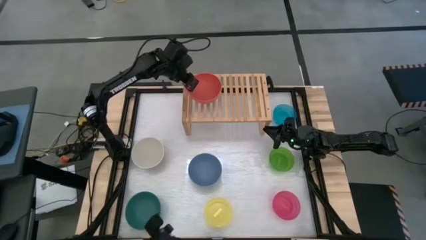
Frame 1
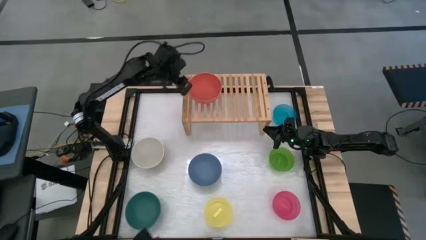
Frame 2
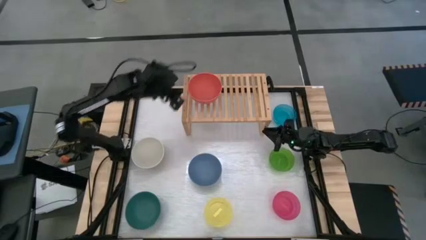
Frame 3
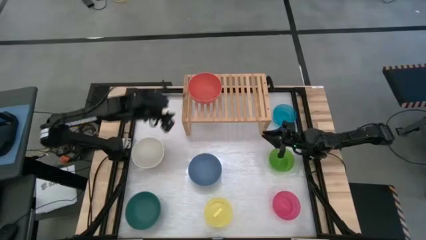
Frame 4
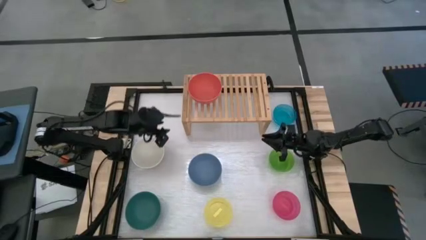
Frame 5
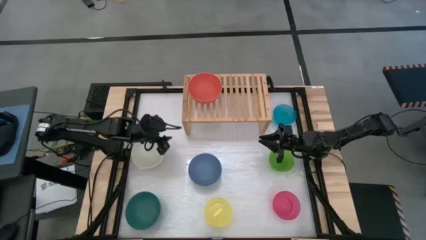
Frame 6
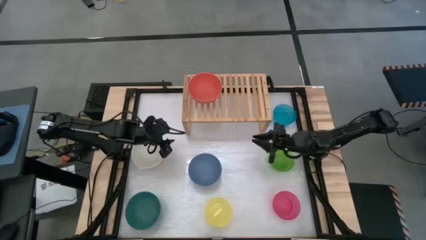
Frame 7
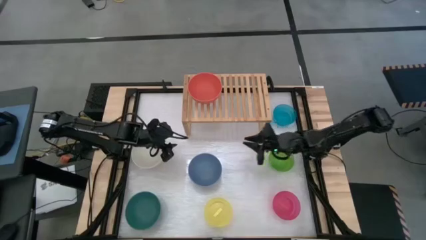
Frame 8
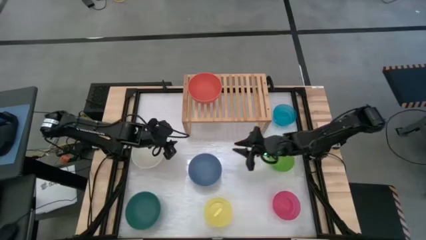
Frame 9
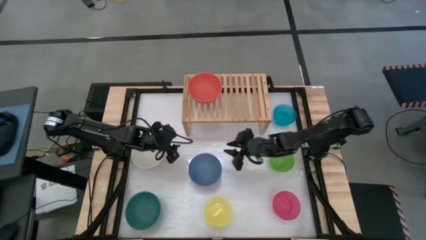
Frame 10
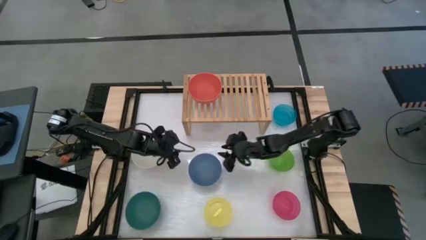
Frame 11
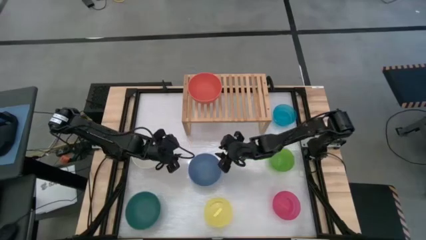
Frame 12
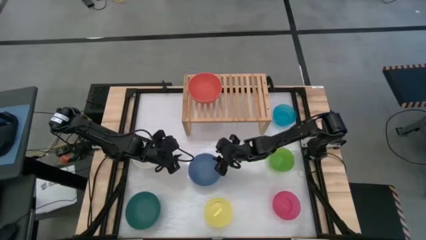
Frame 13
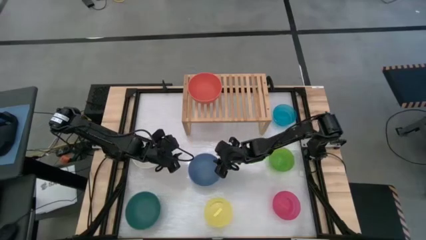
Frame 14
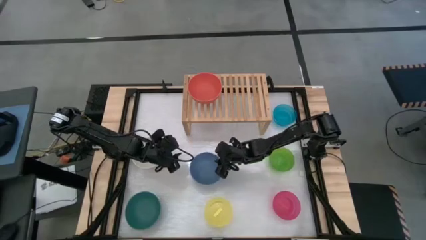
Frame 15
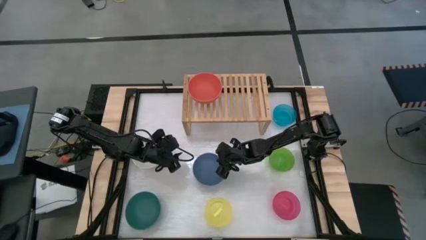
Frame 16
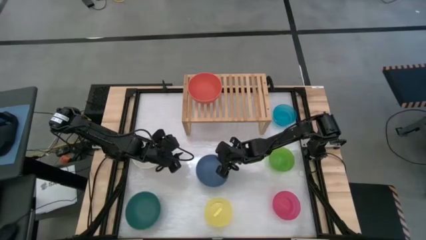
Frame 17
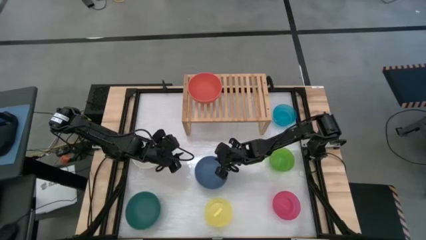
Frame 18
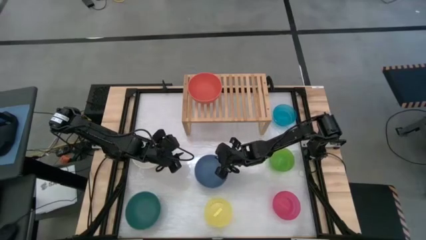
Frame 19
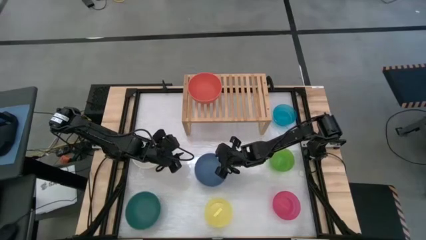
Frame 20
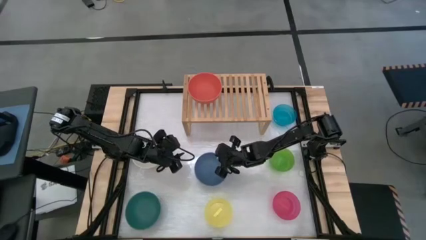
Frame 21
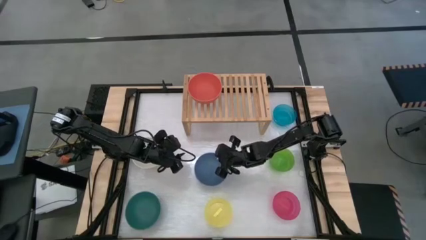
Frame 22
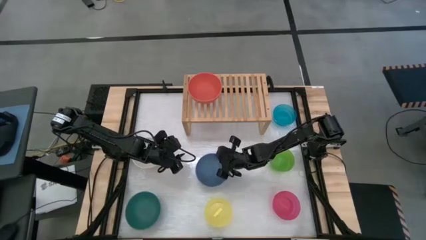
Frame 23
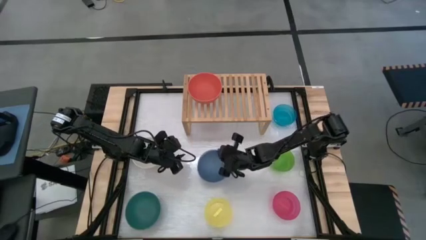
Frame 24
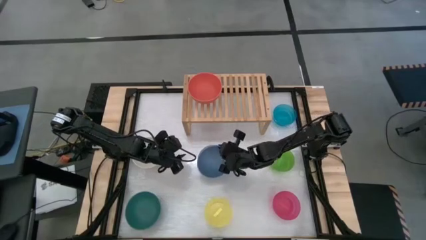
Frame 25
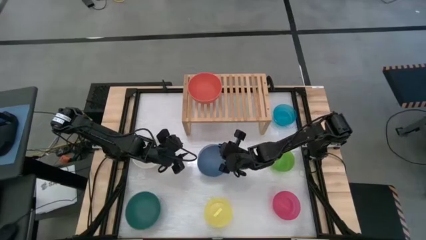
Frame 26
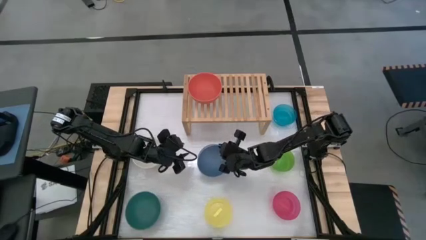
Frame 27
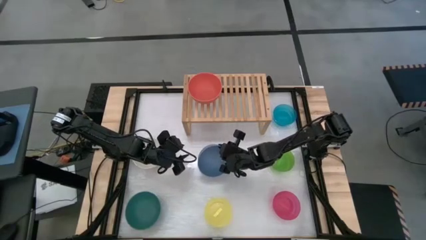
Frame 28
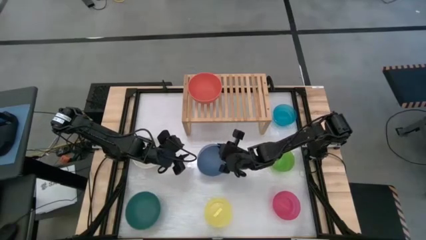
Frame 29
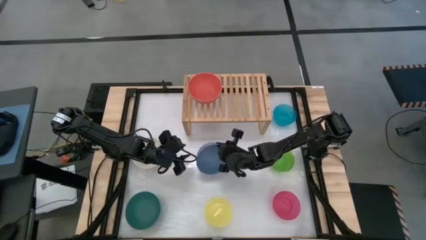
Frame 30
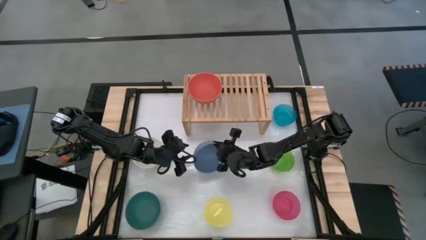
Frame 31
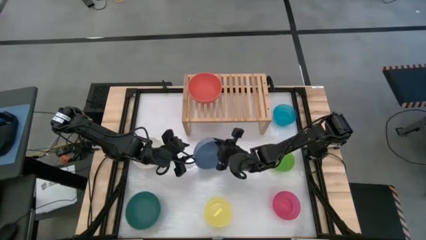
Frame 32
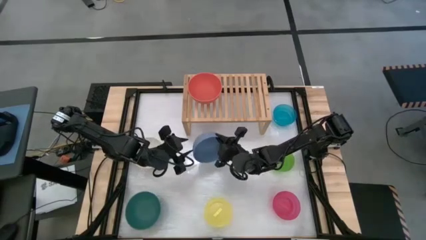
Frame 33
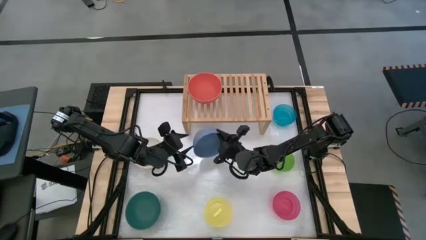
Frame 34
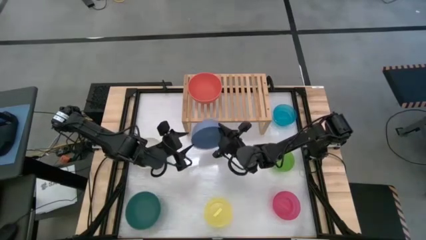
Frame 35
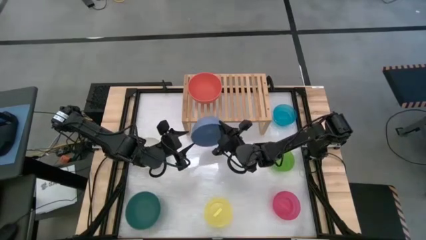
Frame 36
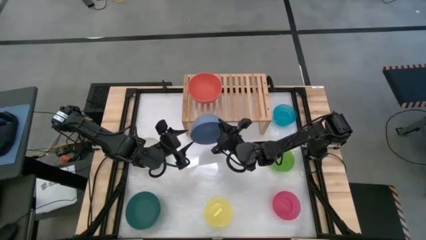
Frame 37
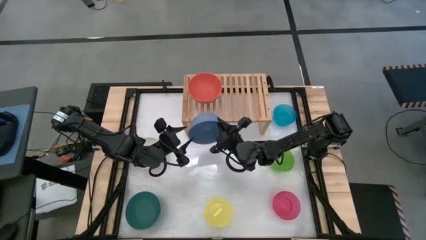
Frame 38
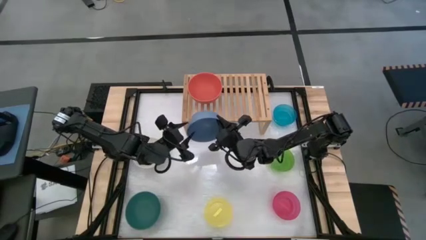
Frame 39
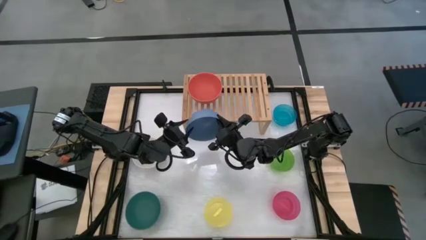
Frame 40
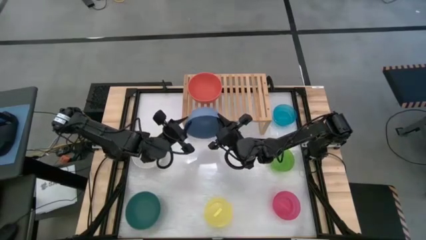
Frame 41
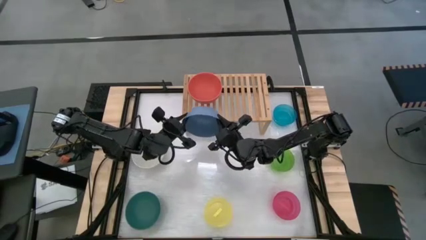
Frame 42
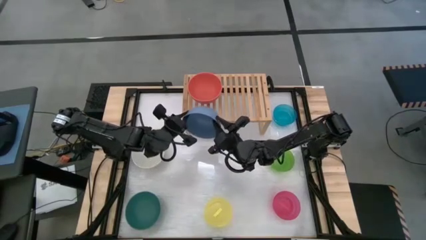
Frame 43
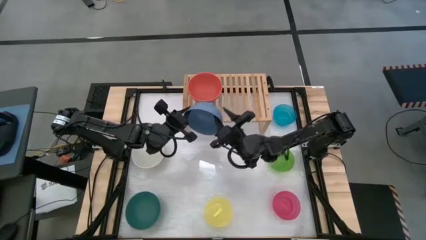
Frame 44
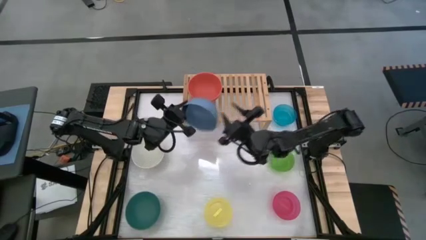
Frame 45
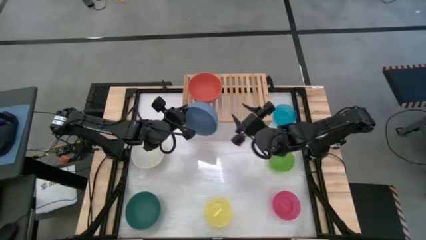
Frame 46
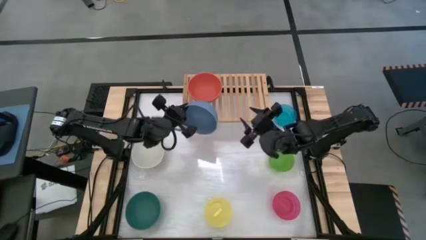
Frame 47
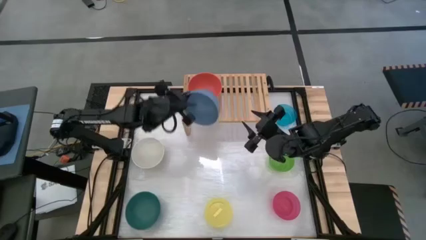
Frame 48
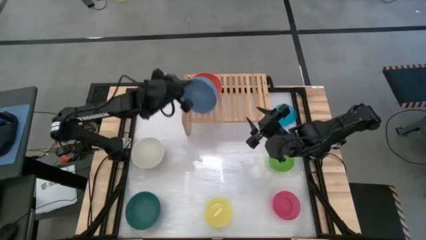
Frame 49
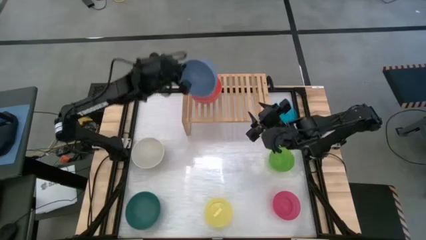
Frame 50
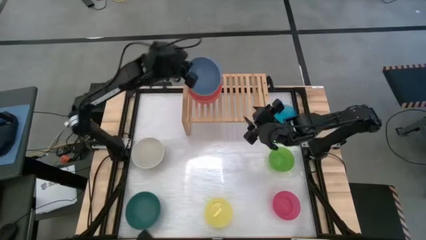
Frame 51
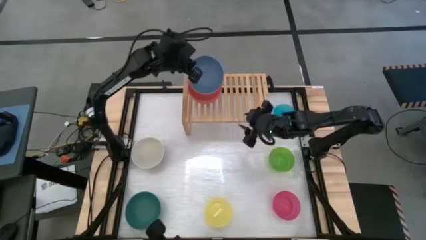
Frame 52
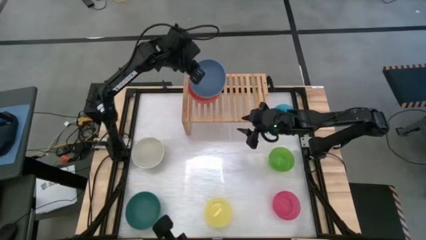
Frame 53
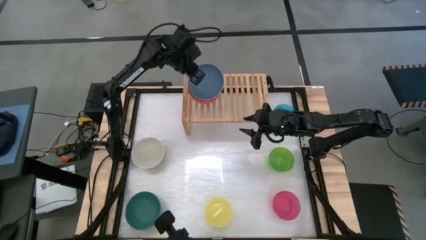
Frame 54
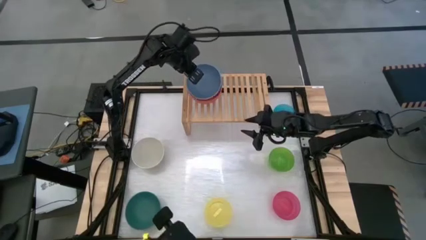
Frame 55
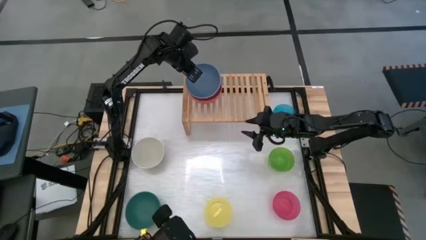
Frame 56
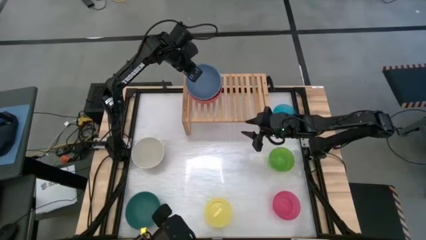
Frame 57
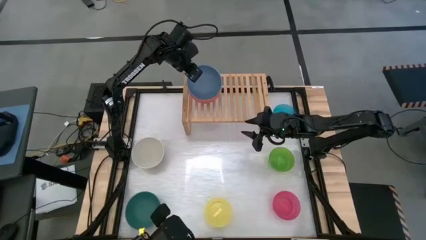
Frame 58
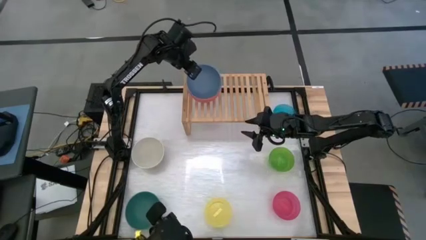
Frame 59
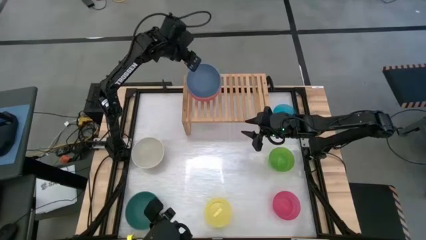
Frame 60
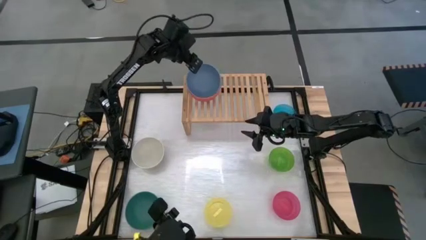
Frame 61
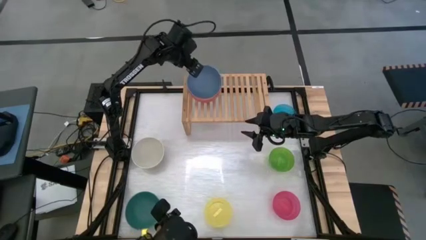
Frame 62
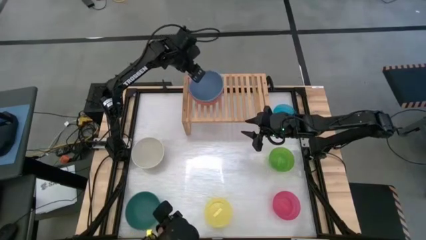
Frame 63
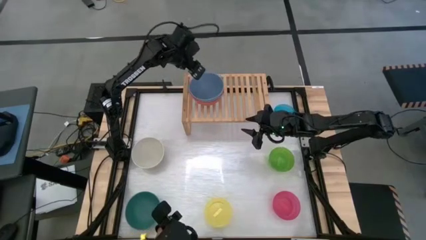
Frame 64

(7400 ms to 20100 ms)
Task: Place and stack bowls onto a shelf
Stack the big blue bowl on top of the big orange bowl on the shelf
